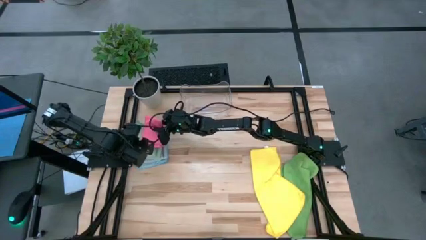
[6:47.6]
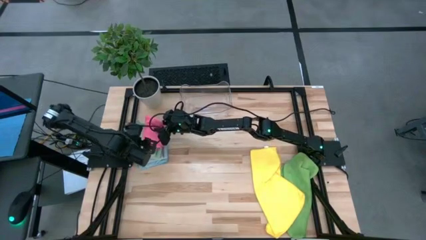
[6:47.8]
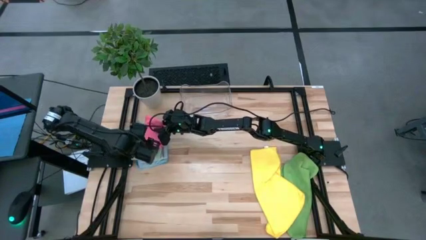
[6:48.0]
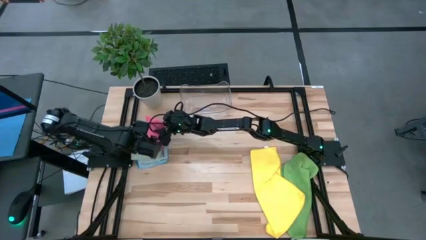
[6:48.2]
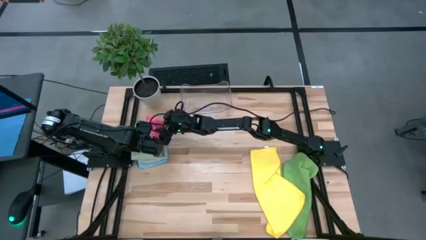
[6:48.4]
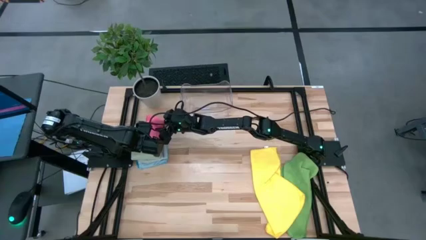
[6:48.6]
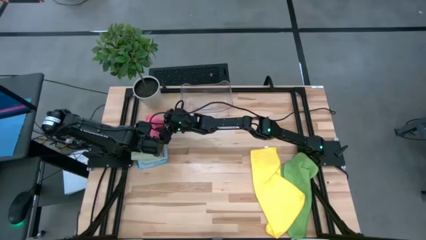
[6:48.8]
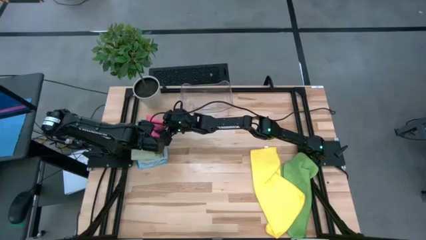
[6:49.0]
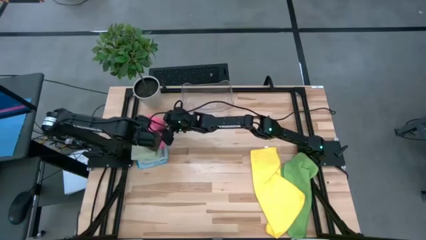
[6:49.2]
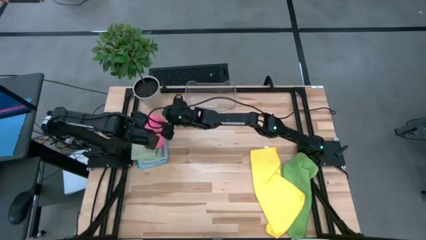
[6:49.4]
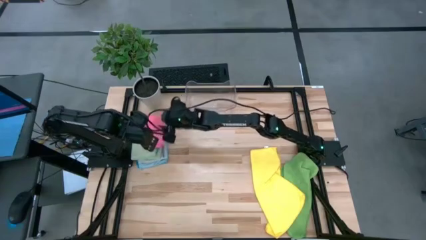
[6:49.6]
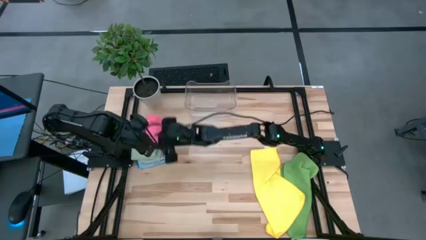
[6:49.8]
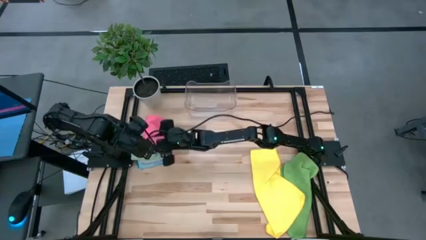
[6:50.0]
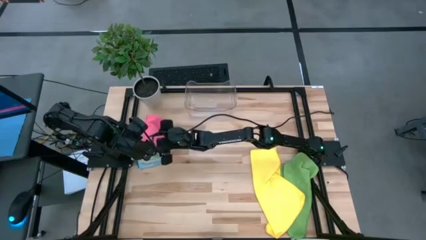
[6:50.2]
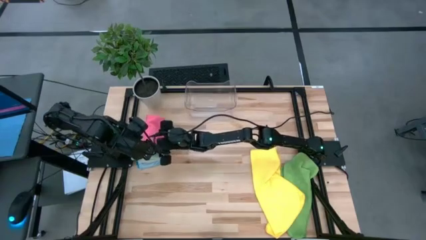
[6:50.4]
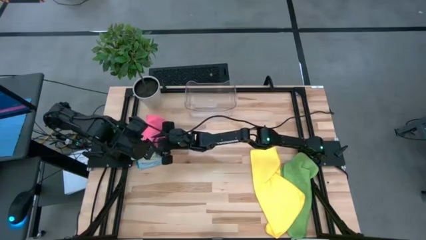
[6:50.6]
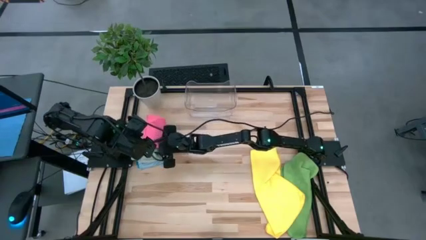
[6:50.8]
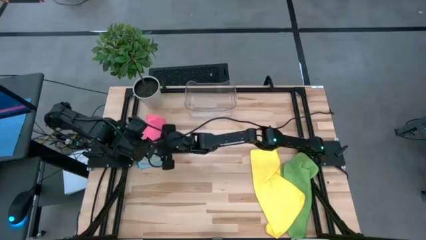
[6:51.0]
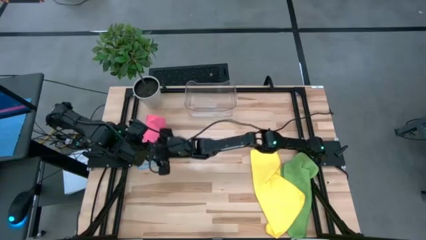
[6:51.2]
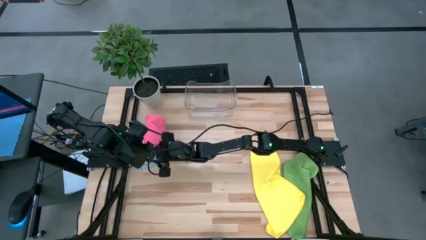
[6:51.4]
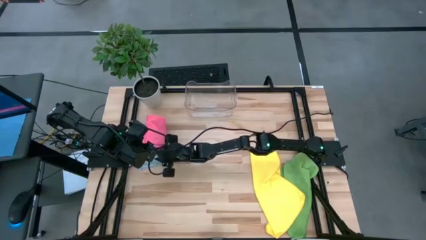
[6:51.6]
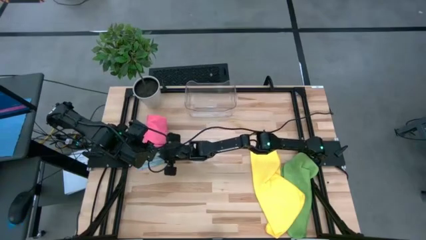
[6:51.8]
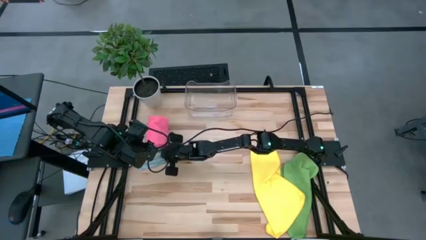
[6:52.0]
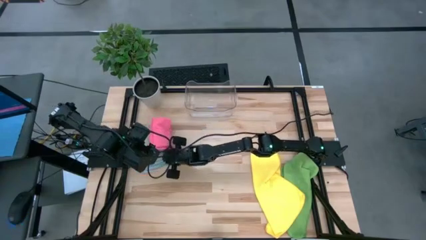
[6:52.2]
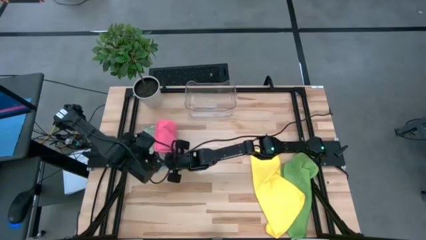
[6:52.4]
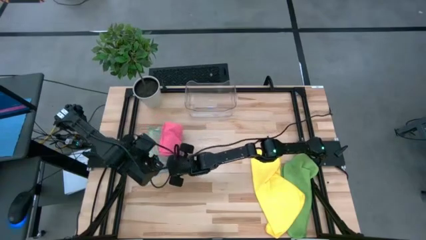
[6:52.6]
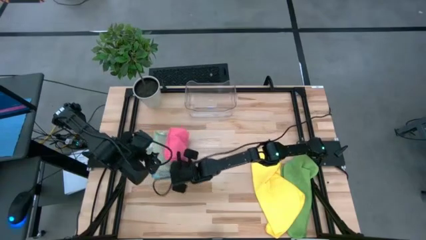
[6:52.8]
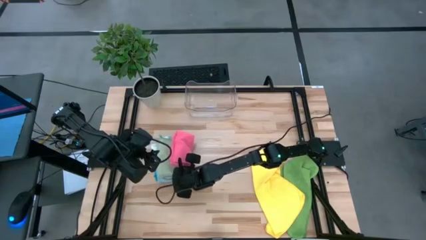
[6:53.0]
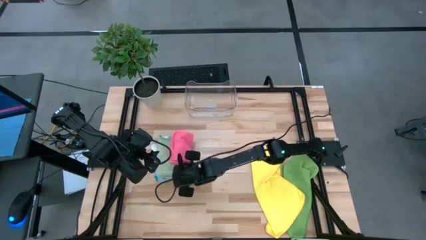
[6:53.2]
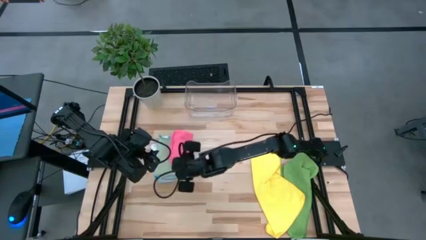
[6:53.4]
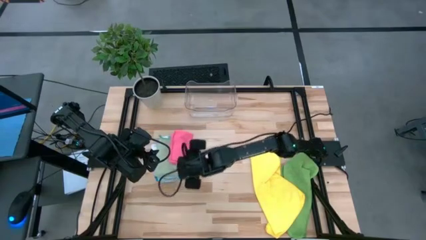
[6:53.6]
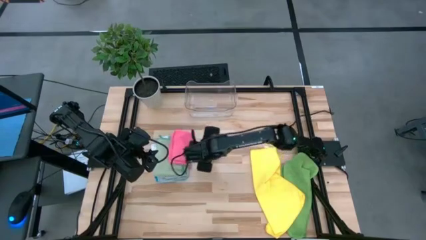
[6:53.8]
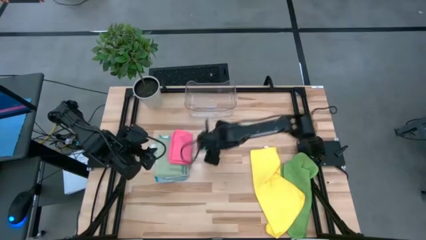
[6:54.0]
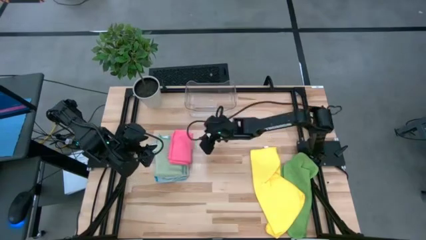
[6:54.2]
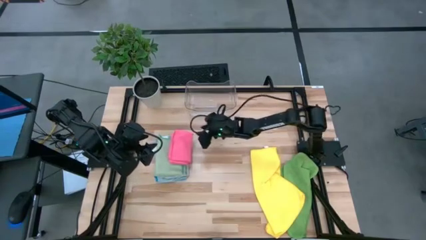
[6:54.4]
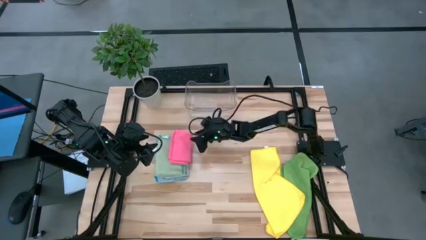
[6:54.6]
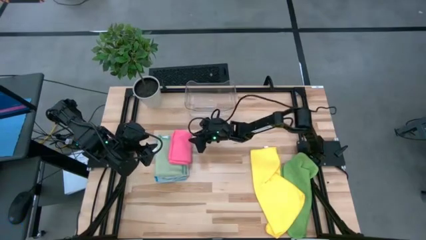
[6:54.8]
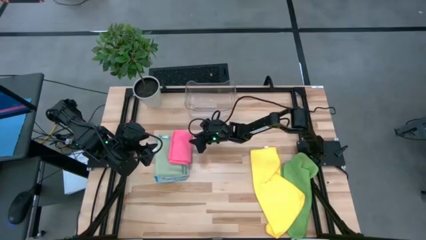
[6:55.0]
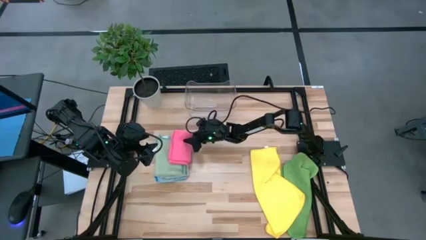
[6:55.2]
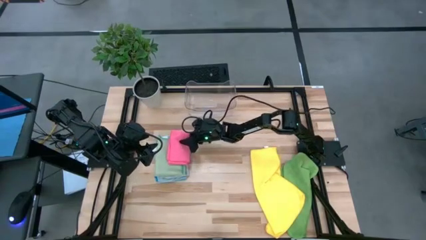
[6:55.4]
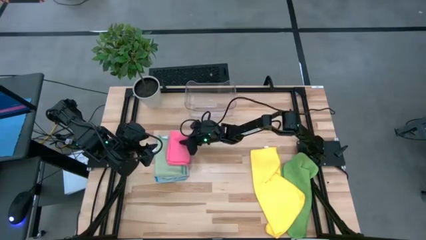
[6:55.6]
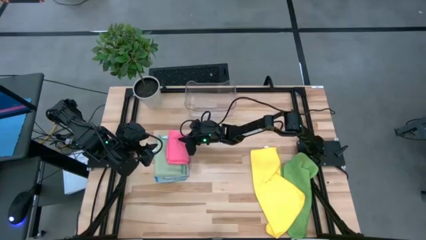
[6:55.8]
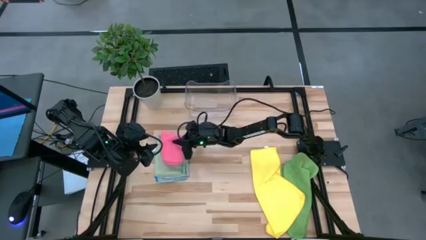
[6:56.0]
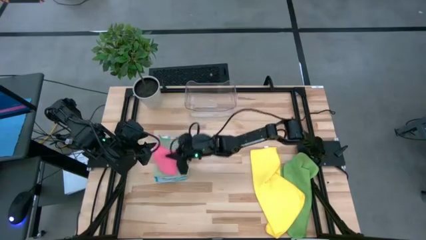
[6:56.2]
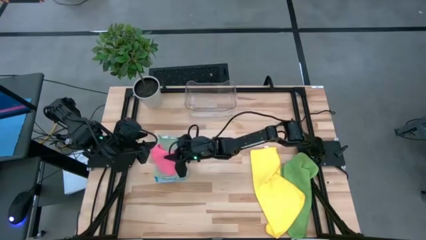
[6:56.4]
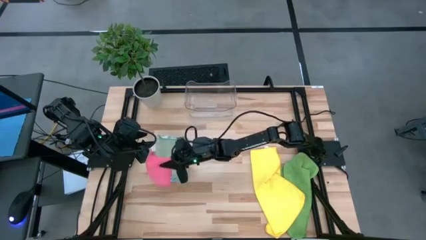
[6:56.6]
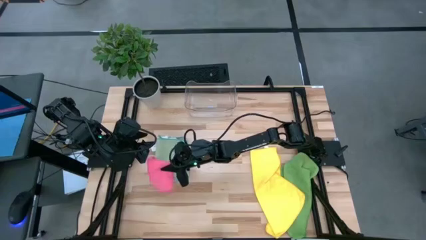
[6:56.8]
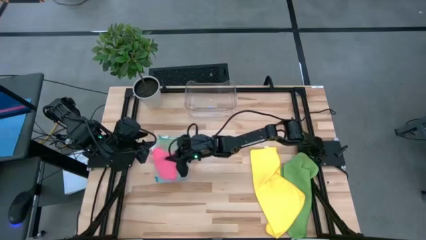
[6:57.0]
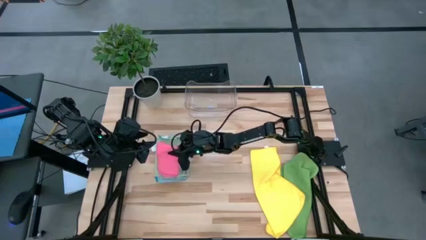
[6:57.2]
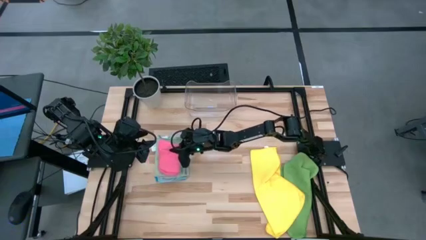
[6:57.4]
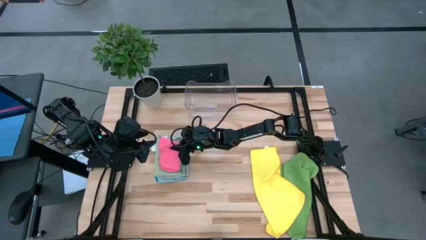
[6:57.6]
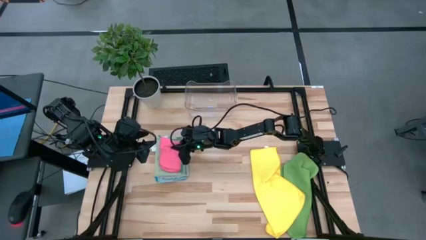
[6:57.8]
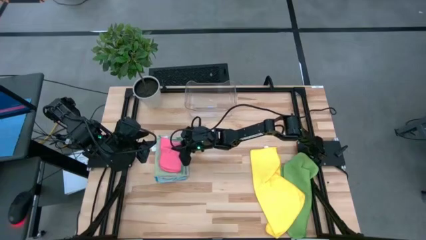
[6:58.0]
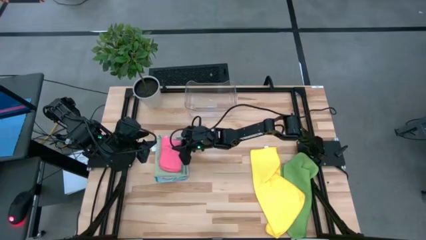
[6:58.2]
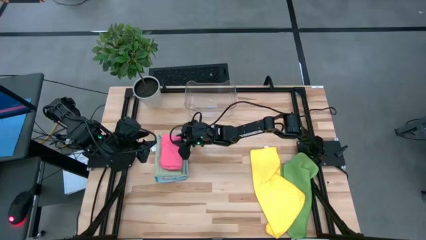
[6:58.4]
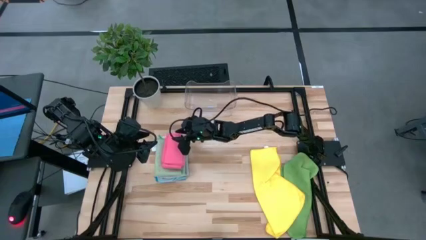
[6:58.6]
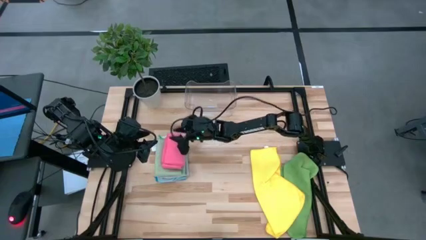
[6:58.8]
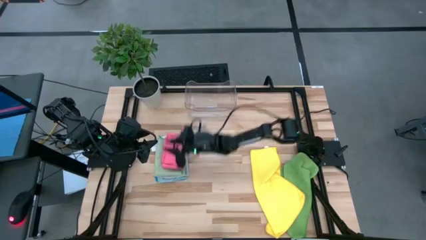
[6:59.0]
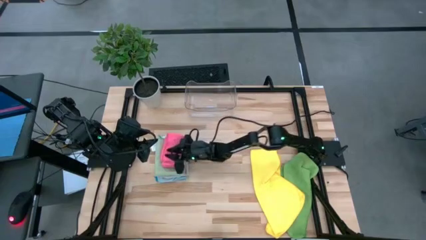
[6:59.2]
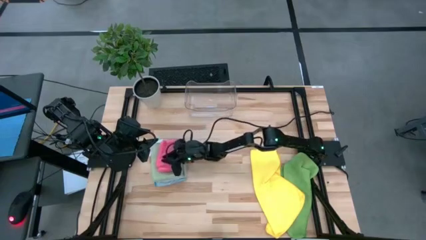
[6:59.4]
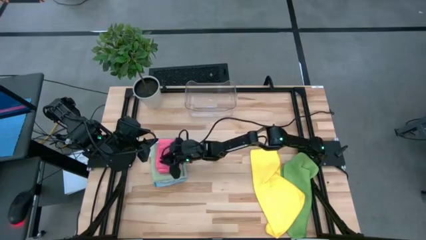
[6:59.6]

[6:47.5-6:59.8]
Task: Fold microfiber towels
Stack the folded pink microfiber cloth on top of the folded light green microfiber cloth

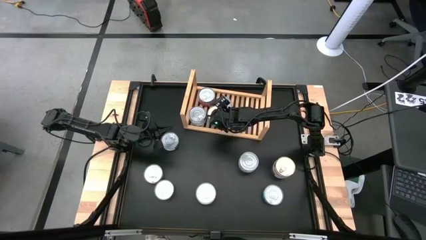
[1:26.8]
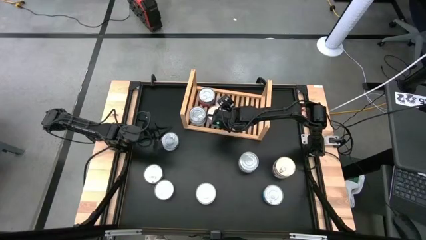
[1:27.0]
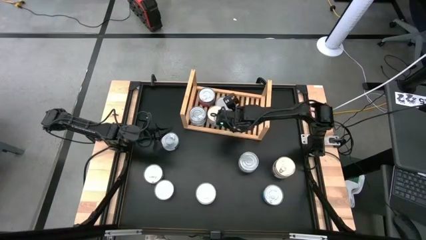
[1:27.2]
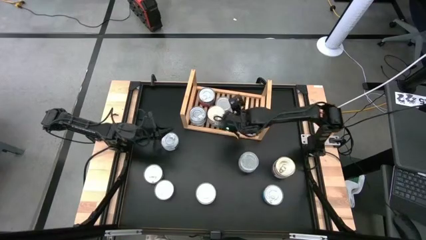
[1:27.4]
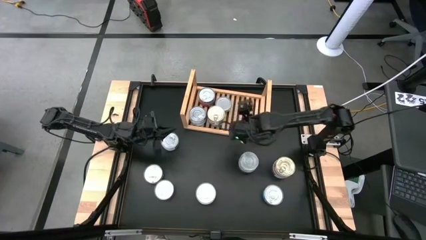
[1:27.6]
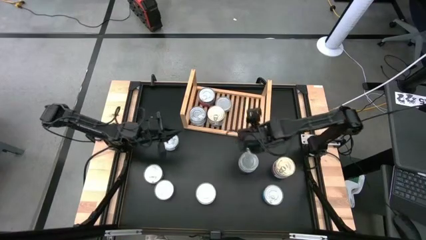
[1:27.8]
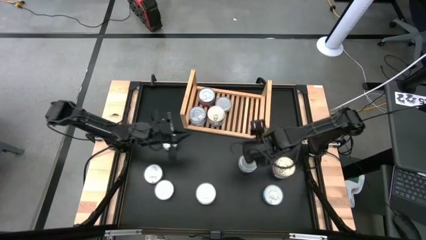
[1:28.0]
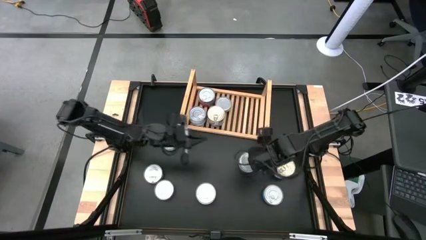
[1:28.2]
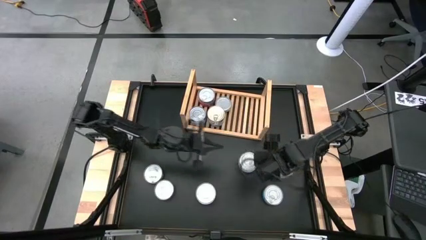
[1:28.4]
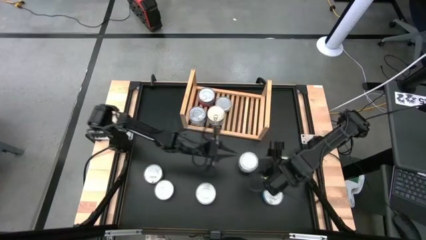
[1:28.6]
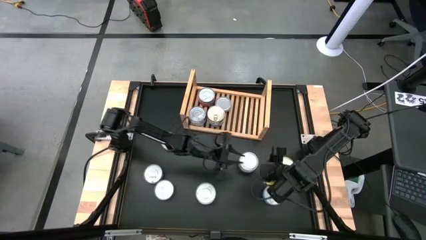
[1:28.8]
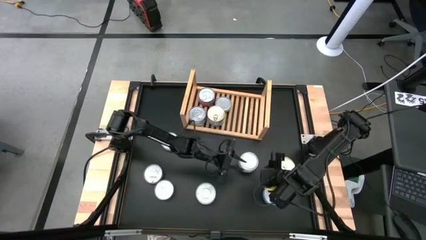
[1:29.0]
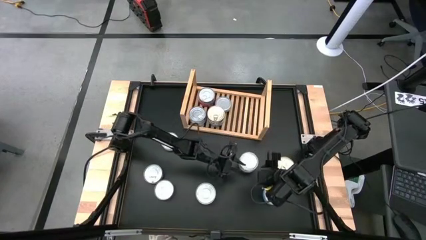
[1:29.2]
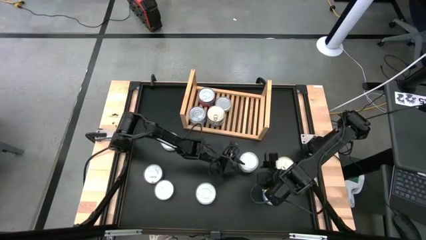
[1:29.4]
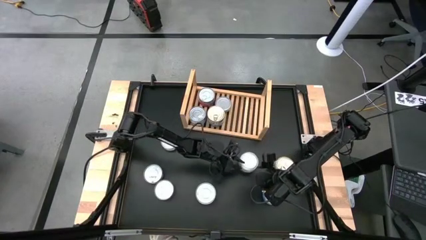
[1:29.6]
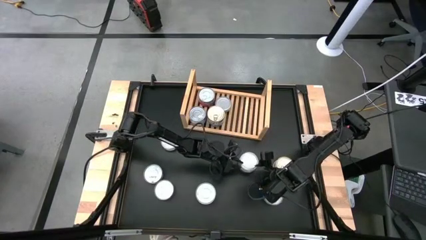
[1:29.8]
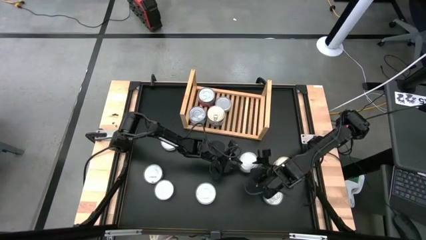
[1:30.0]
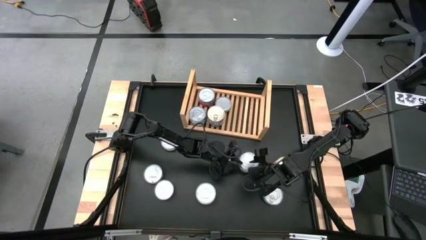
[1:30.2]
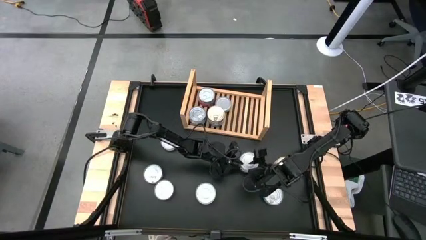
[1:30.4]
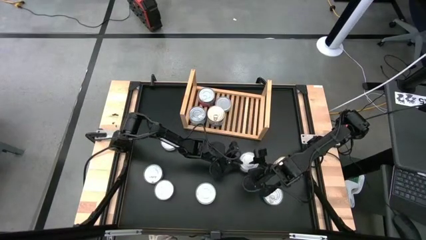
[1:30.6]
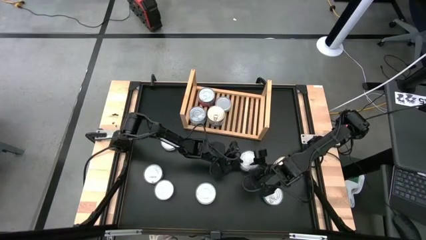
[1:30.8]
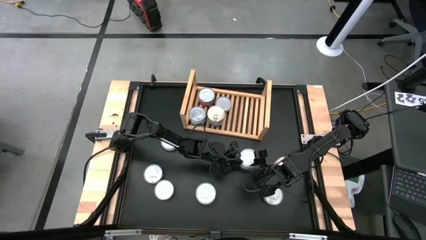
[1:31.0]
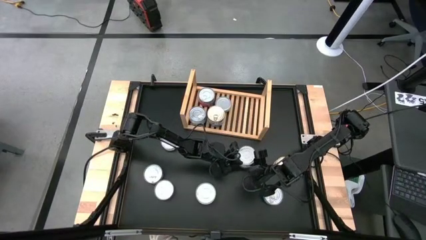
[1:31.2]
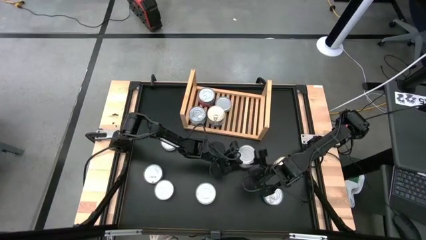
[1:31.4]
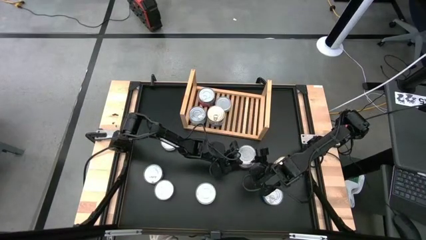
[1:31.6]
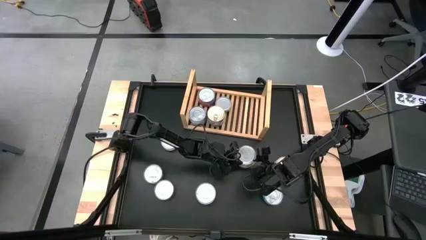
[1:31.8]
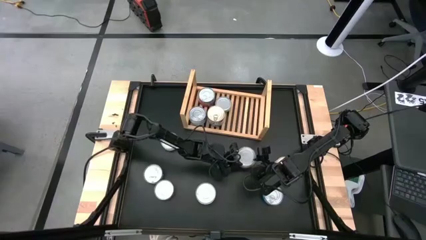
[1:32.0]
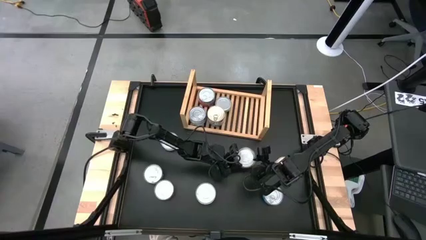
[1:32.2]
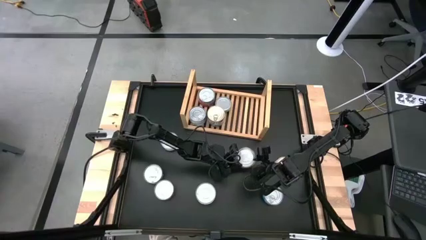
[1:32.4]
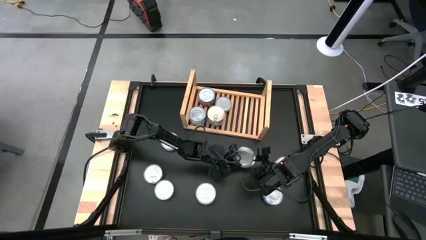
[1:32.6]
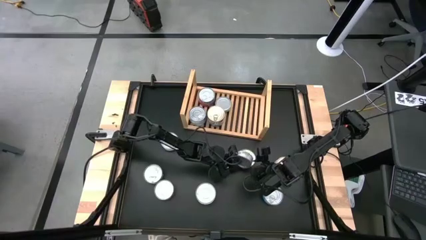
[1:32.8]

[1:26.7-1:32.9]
Task: Stack canned seafood by type on shelf
Stack the green tuna can on top of the other green tuna can on the shelf
